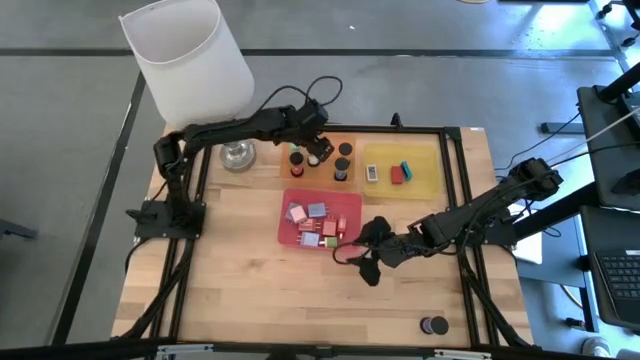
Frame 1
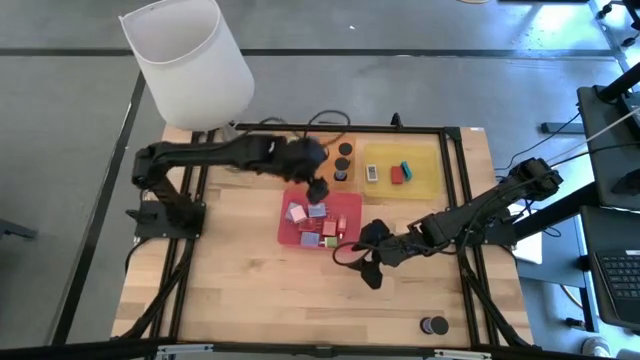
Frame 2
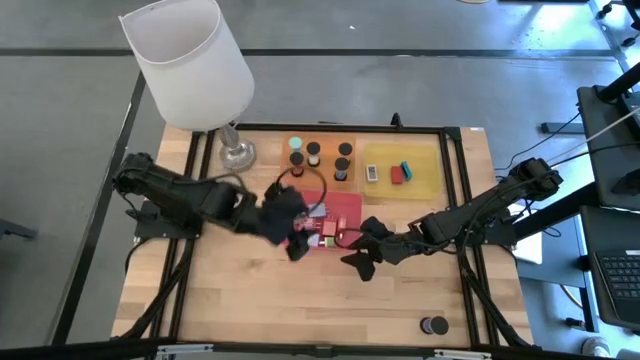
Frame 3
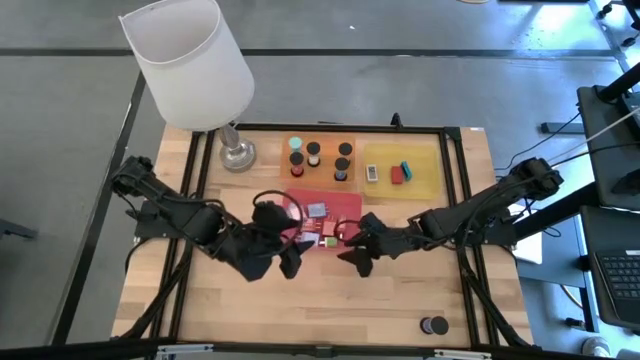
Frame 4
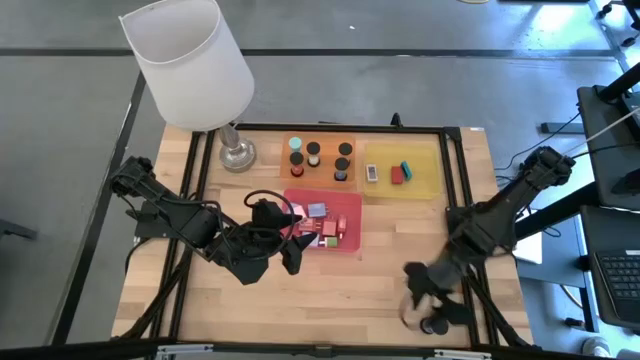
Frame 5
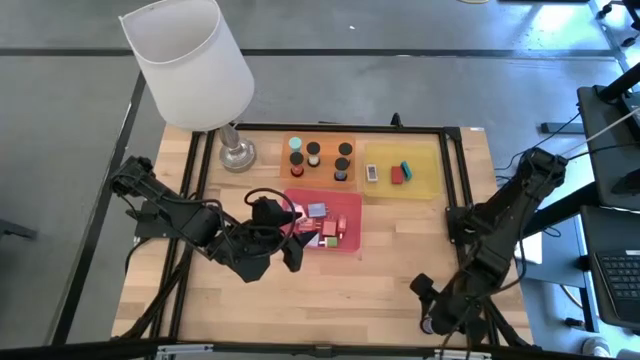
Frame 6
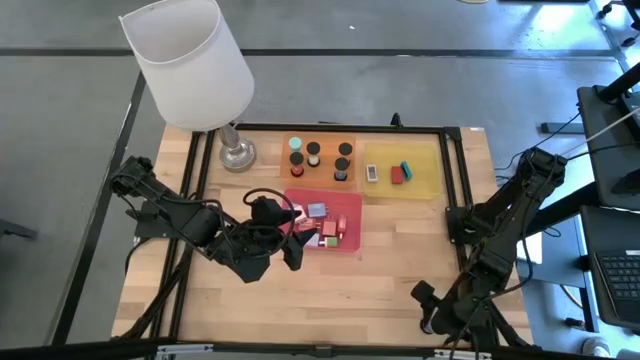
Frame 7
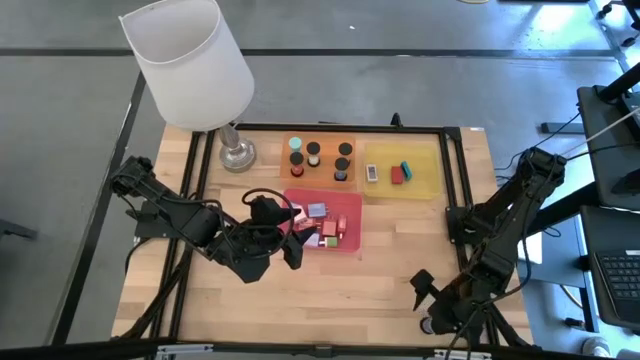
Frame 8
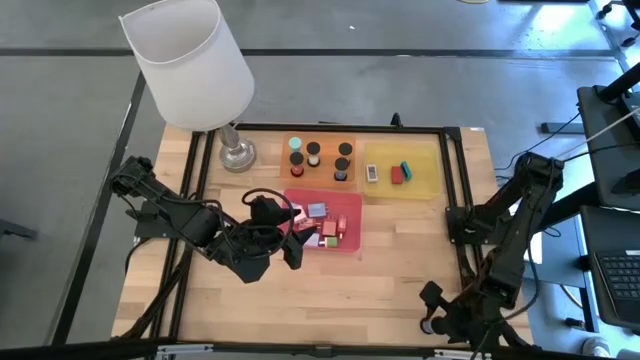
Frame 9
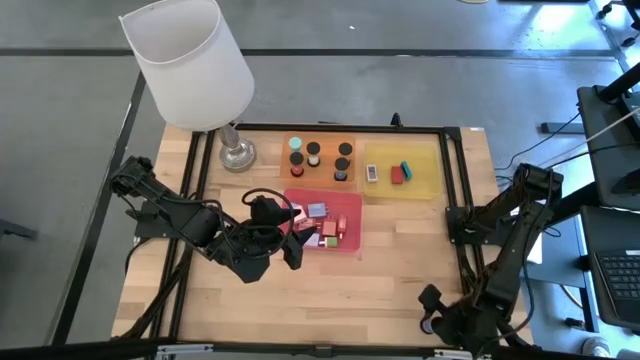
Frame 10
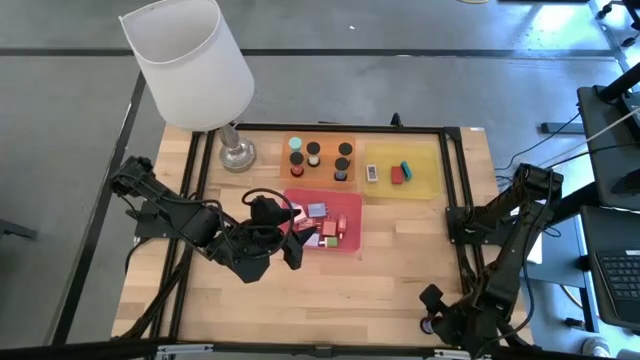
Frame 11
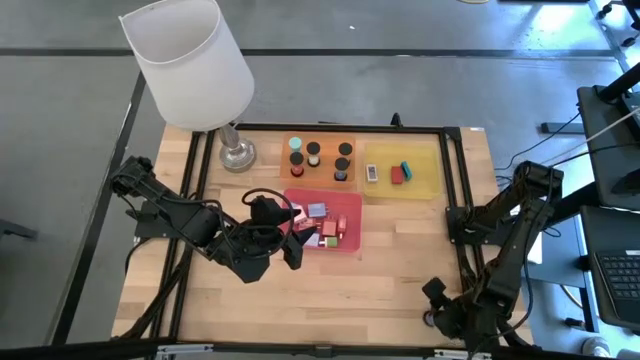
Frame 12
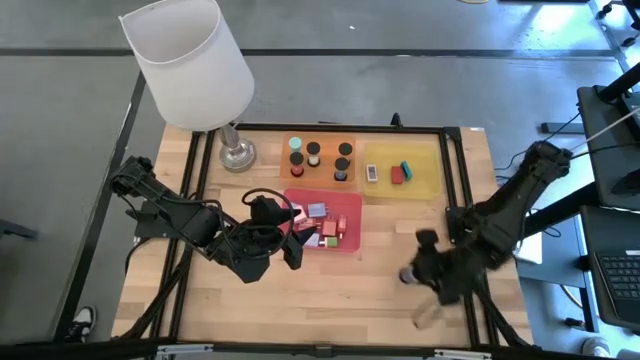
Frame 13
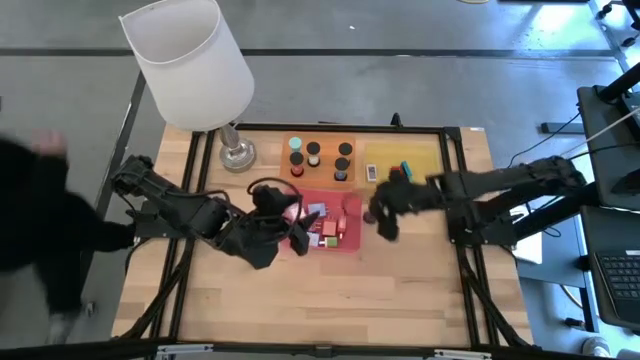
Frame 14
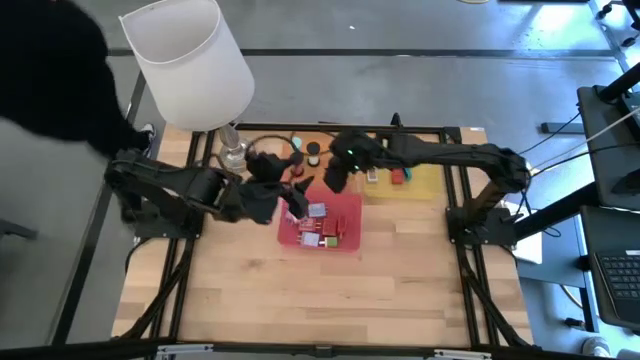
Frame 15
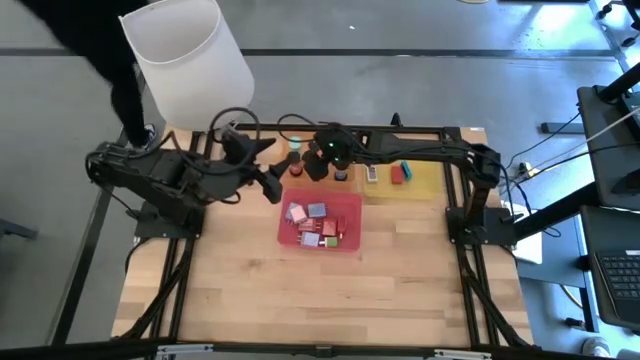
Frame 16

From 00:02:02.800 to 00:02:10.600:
Task: Pick & Place Office items
Put the blue hourglass into the orange bin

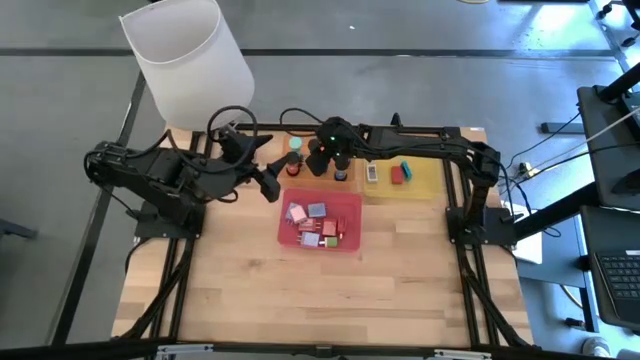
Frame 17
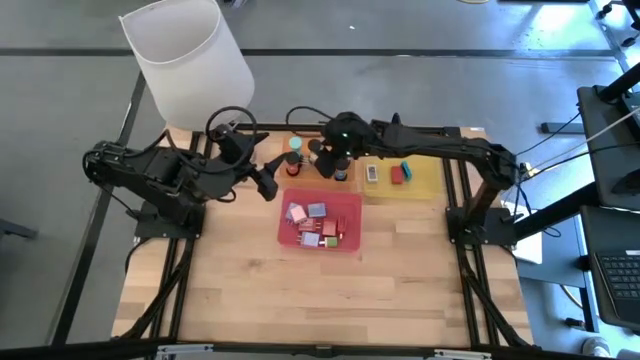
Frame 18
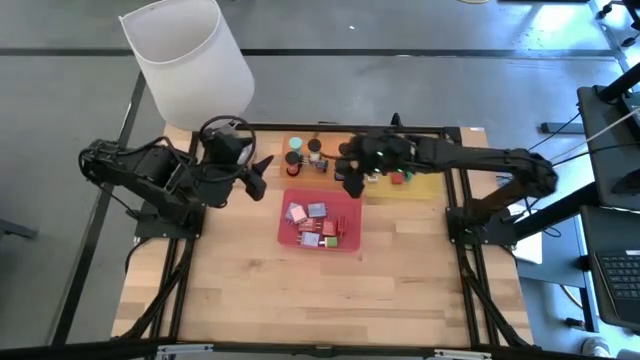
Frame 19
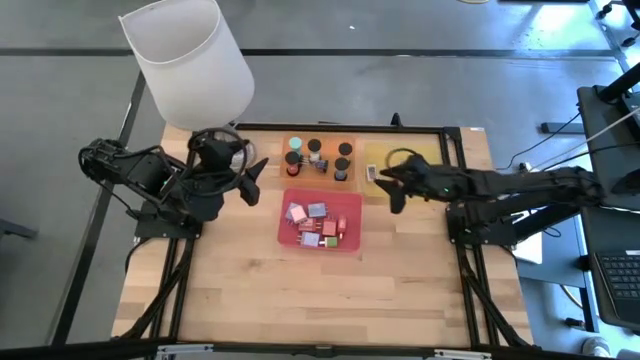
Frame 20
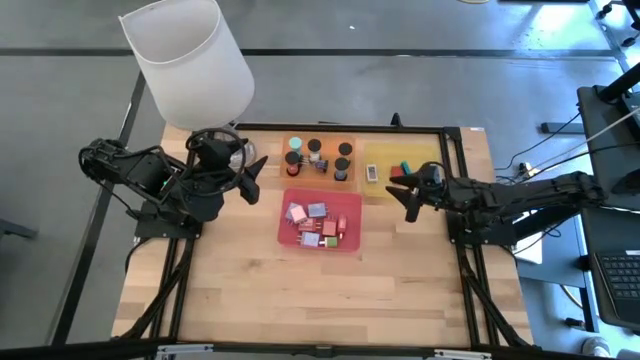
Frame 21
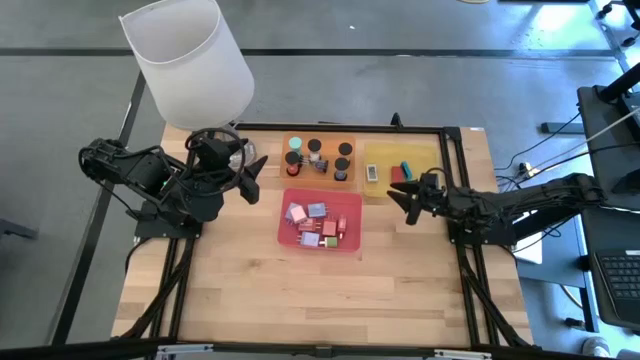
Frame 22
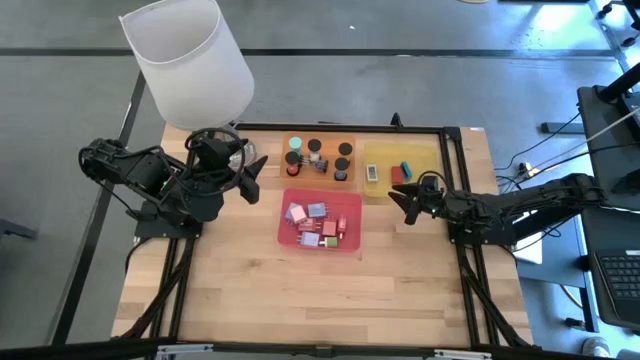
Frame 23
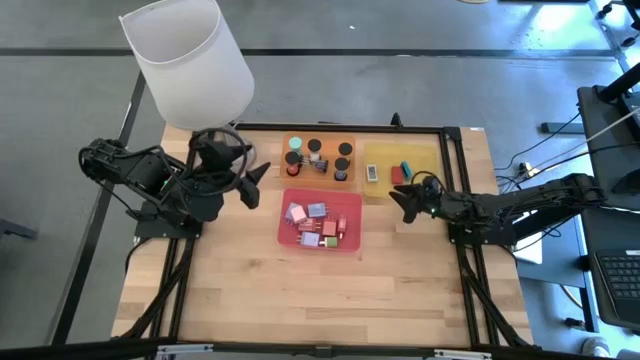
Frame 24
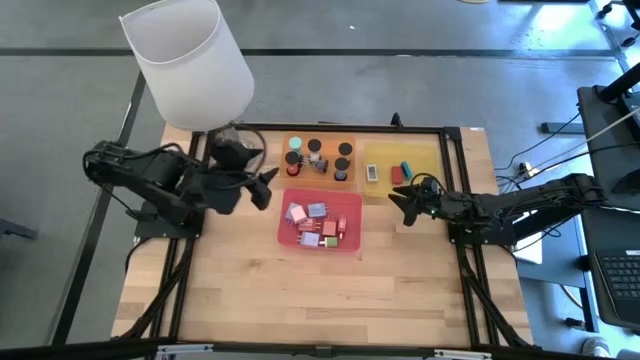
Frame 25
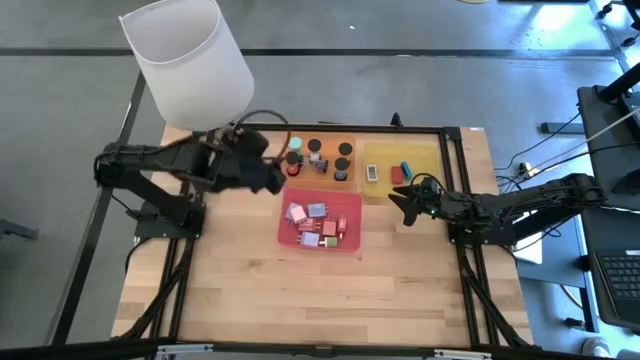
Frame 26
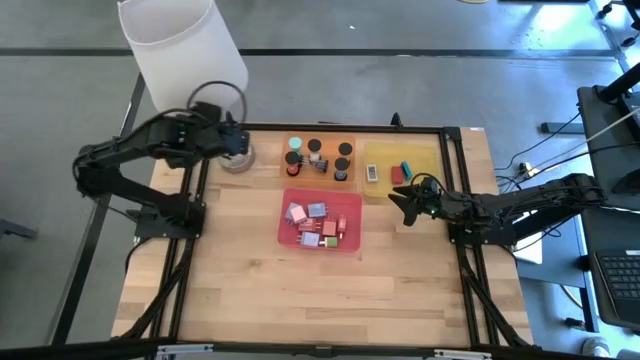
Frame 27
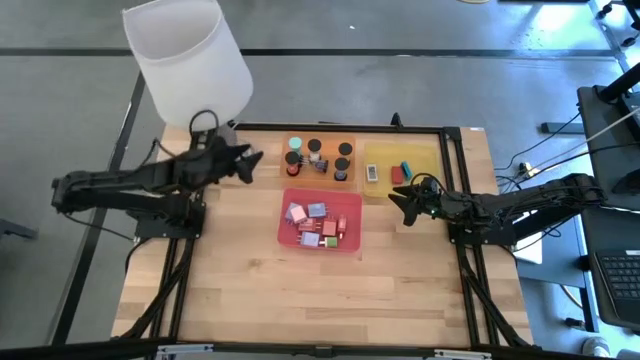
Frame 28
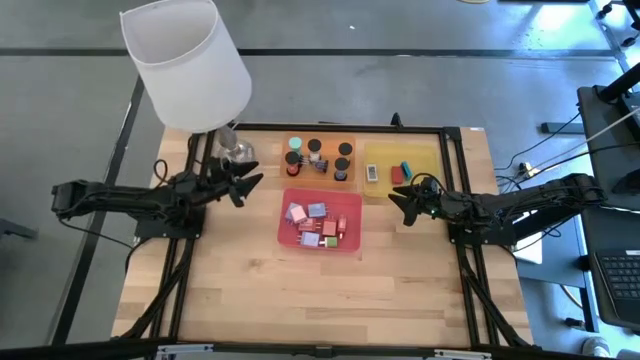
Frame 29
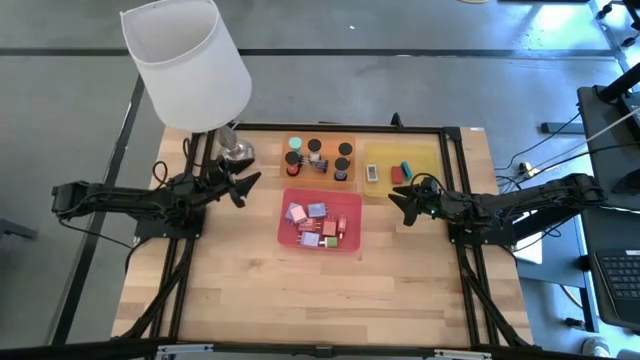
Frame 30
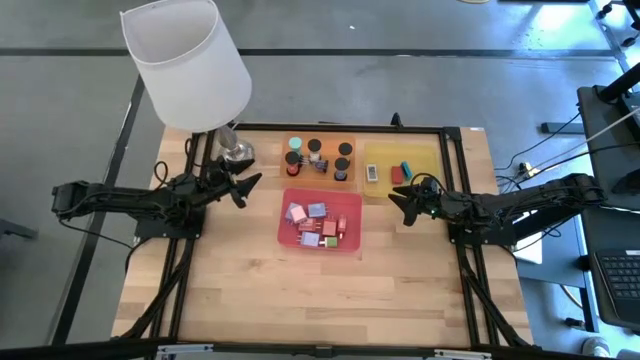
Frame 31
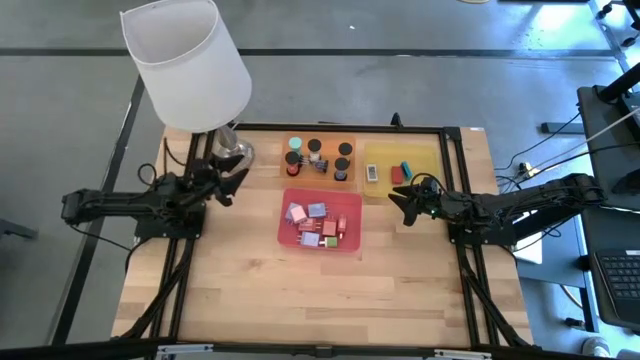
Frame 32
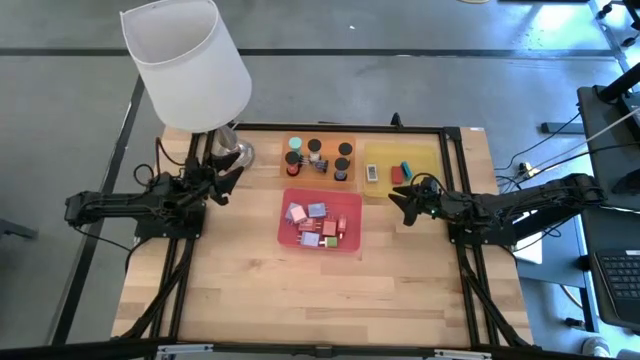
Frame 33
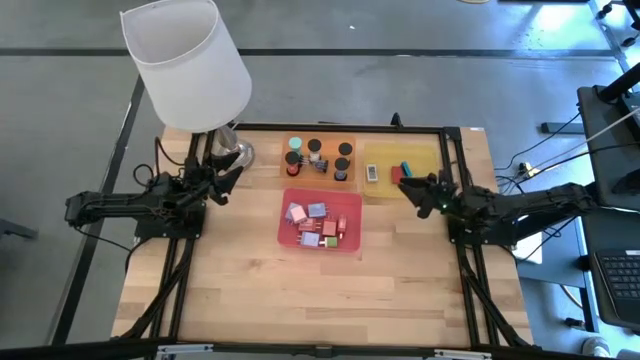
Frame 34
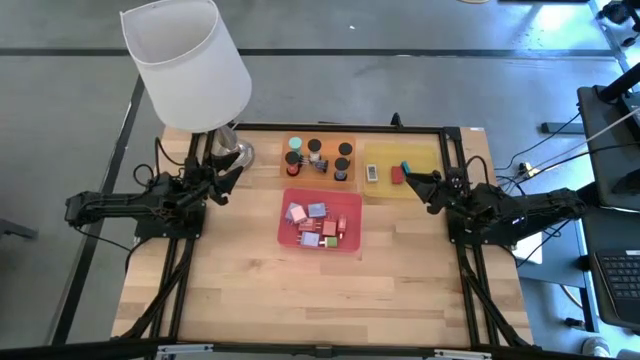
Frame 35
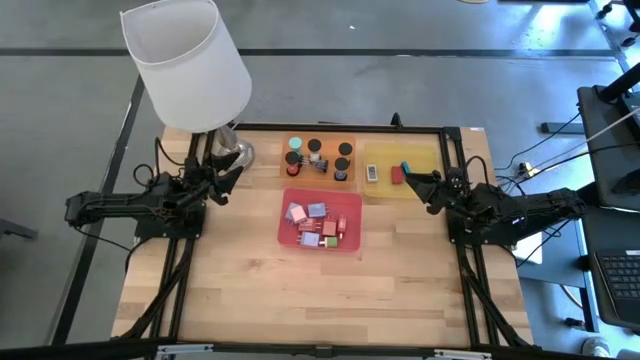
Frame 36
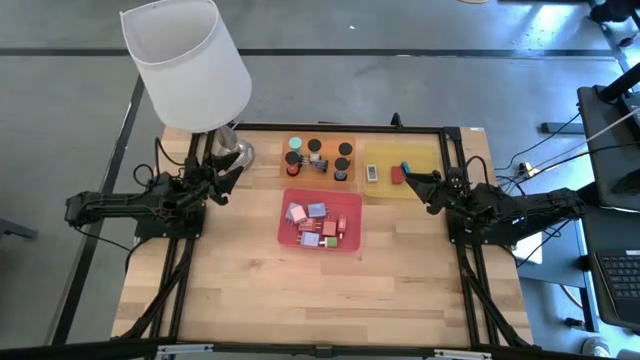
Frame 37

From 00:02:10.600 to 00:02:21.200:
Return to Home Position

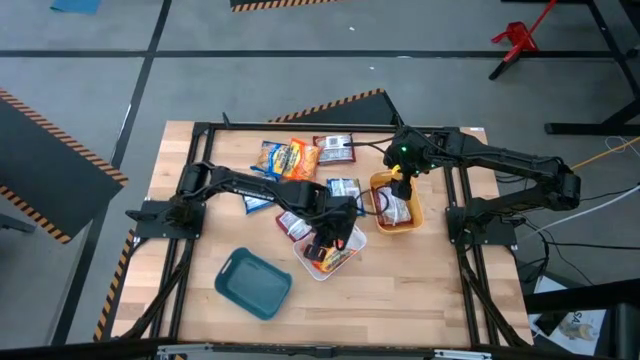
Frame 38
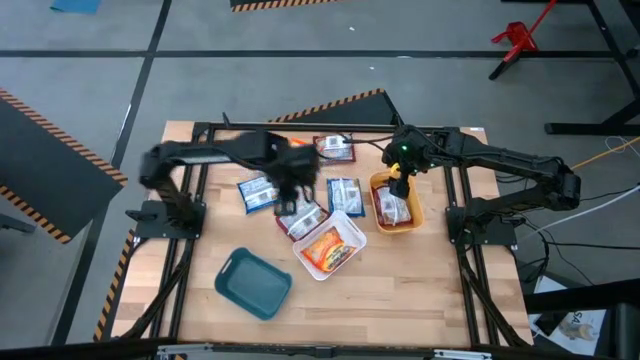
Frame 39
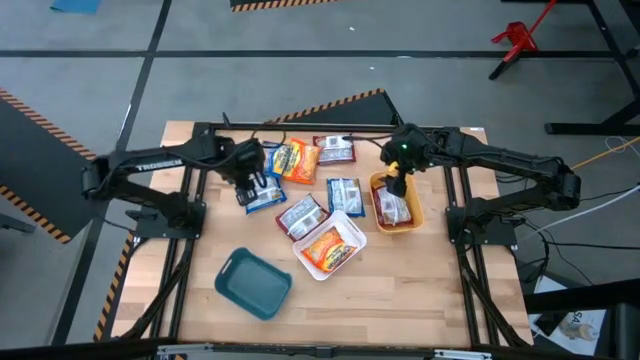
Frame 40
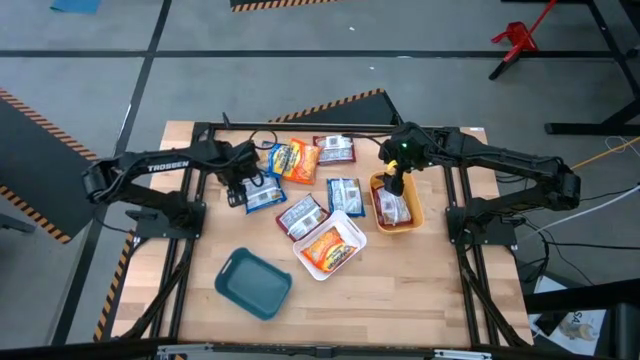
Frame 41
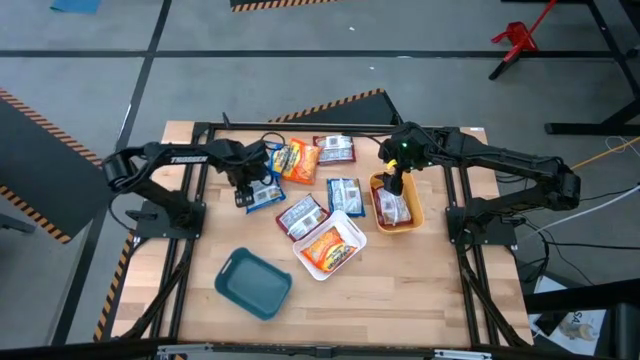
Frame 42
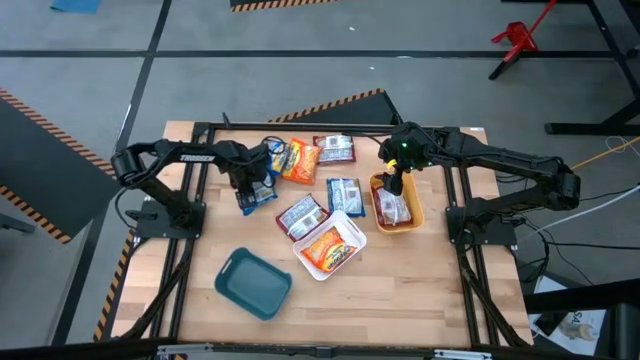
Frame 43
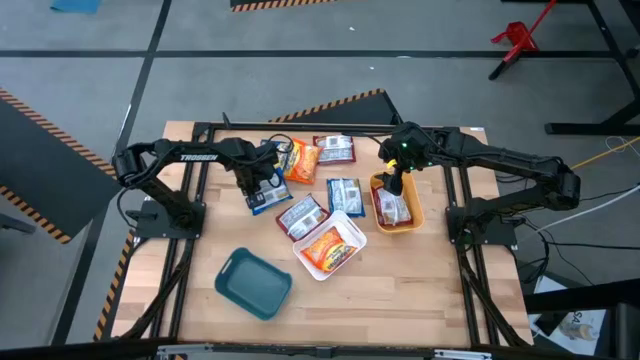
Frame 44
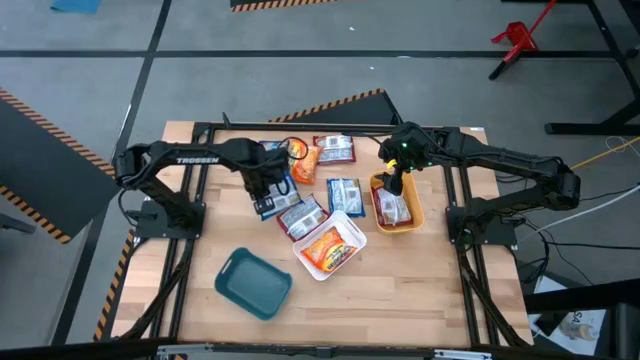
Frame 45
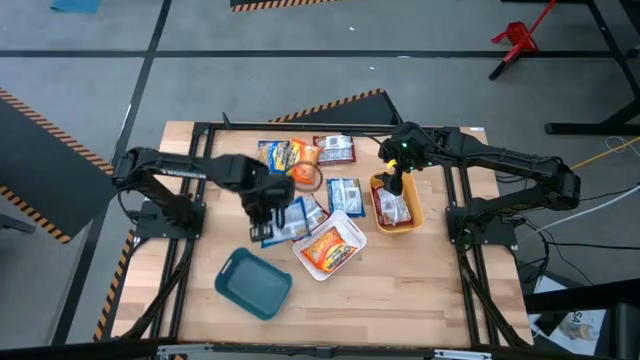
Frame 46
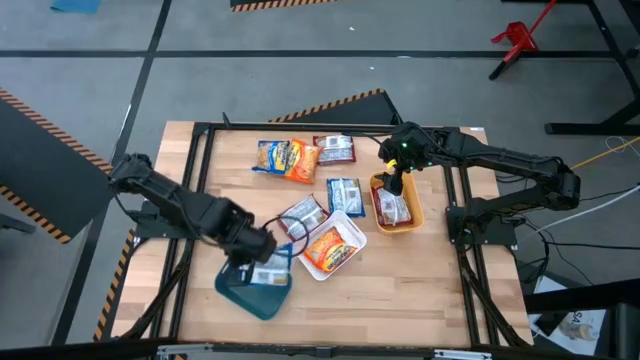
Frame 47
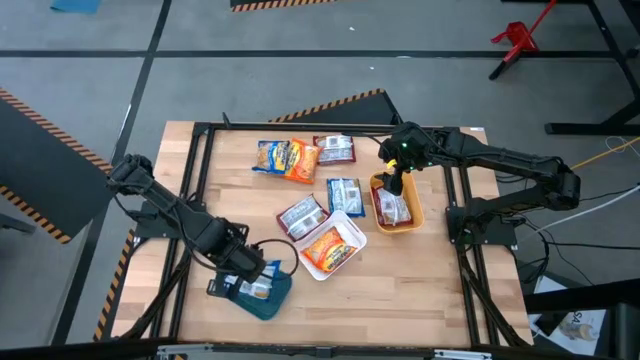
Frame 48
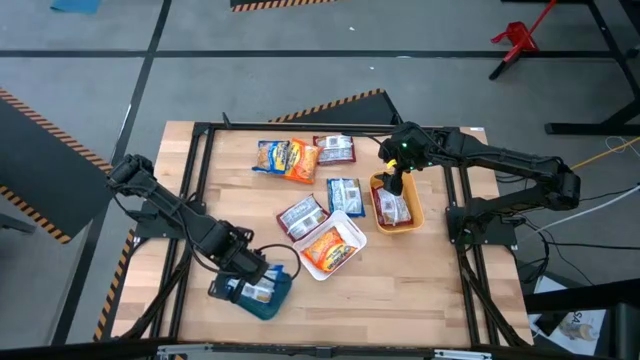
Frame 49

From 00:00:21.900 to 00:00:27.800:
Task: Sort Maruchan noodles
Put the bottom left blue noodle pack into the green bin
